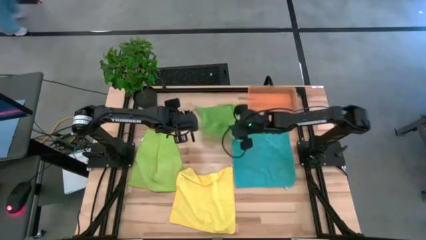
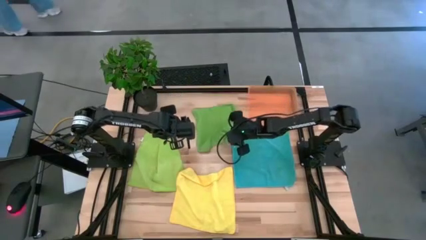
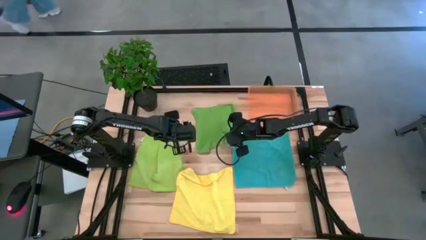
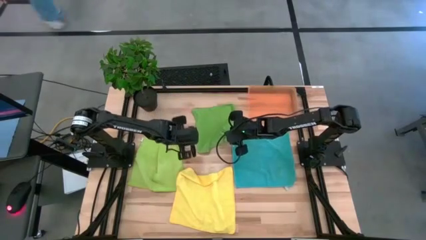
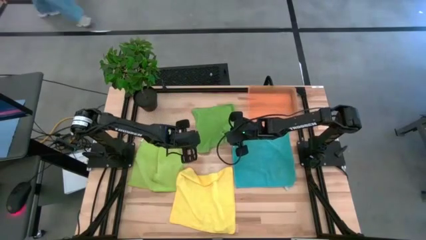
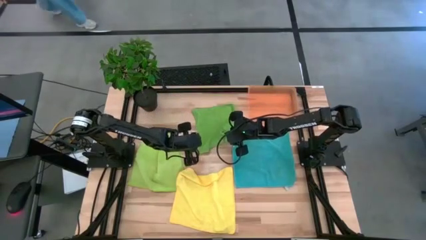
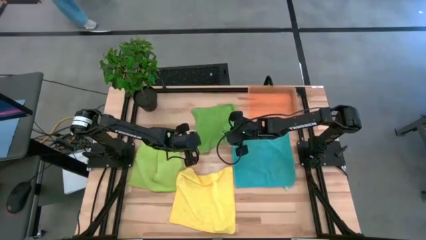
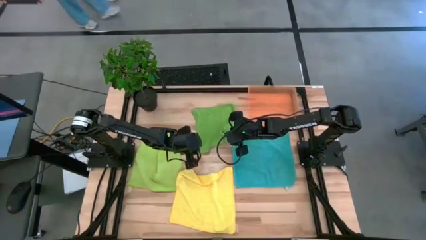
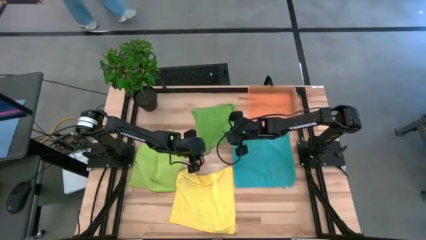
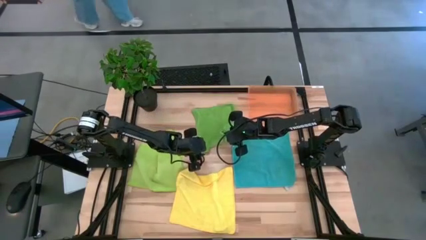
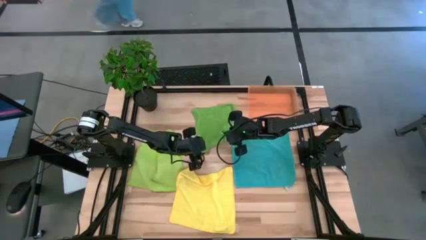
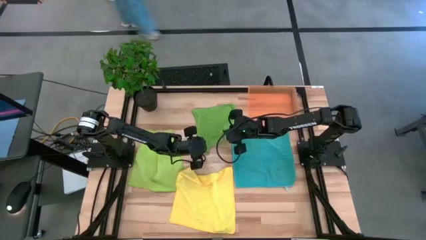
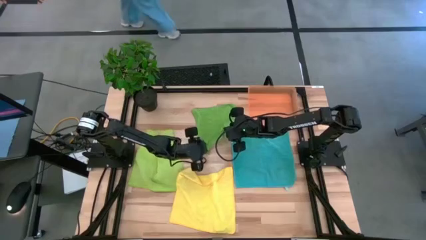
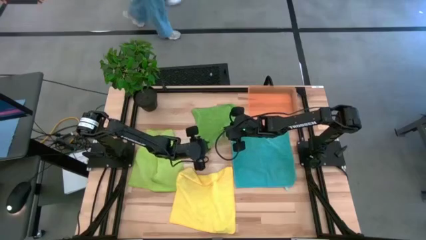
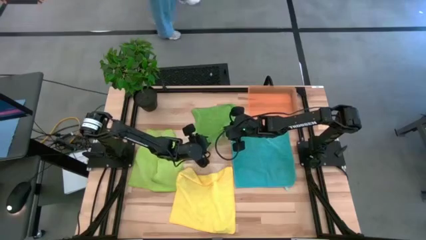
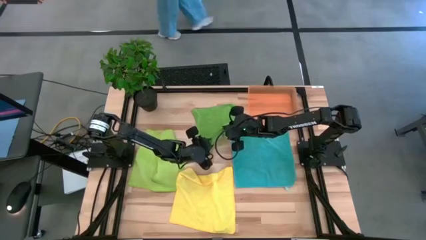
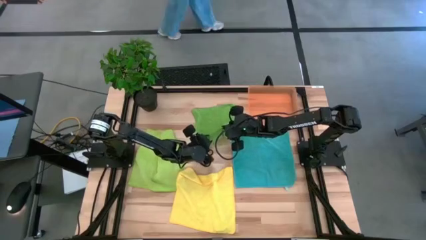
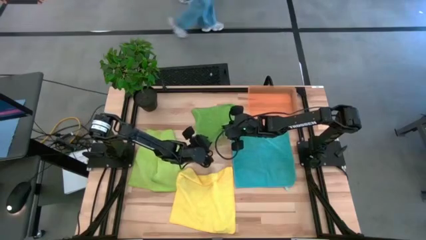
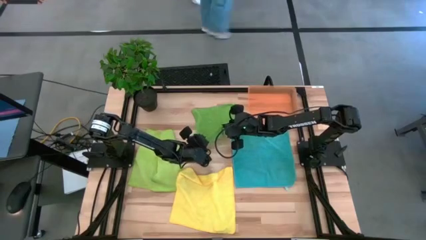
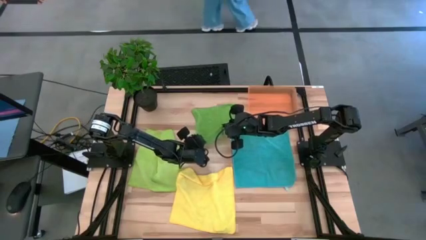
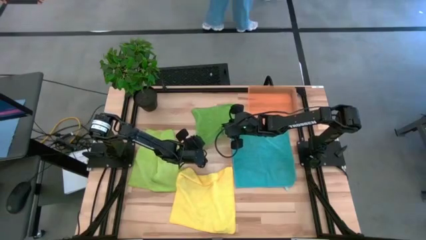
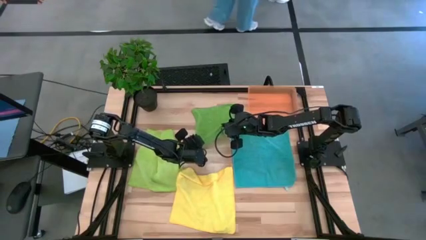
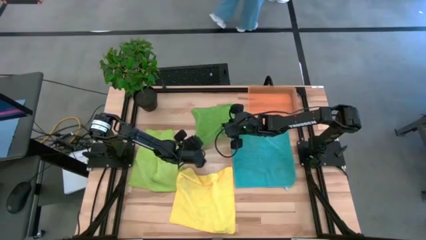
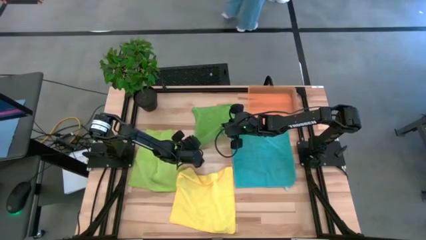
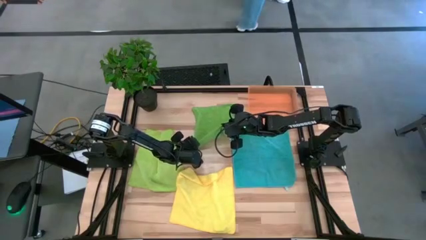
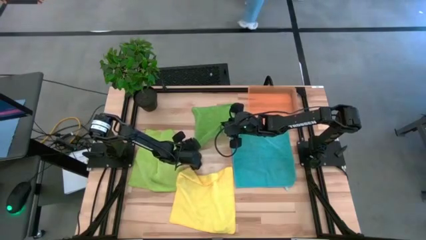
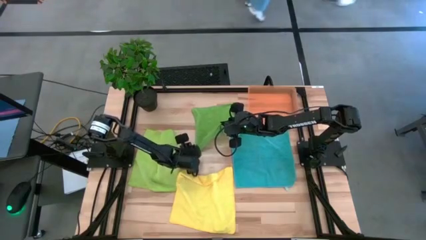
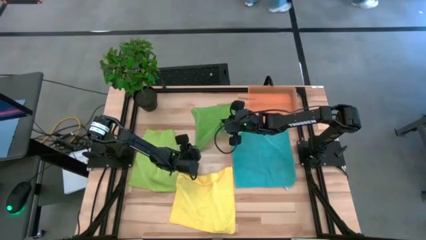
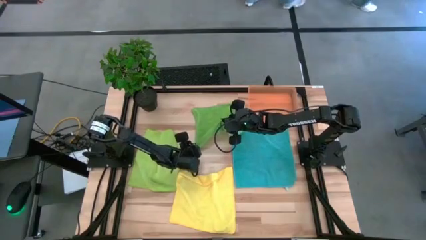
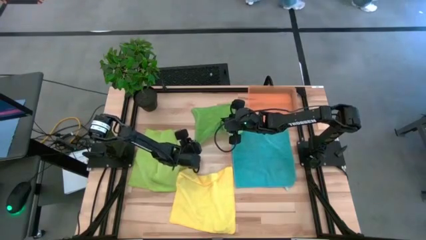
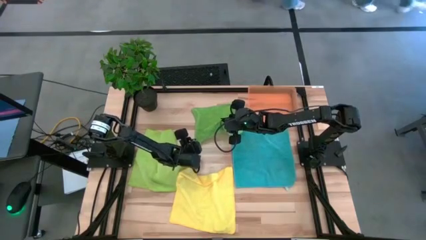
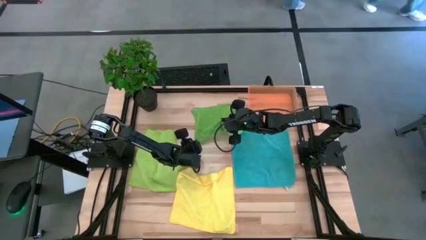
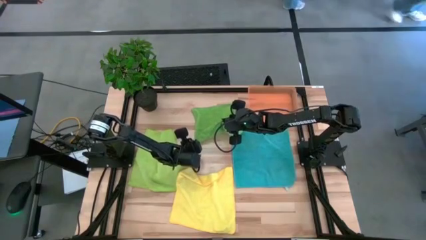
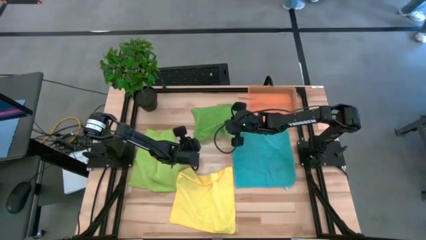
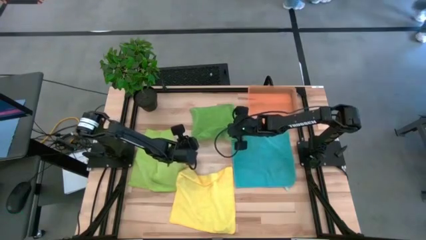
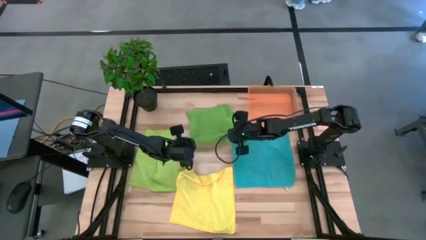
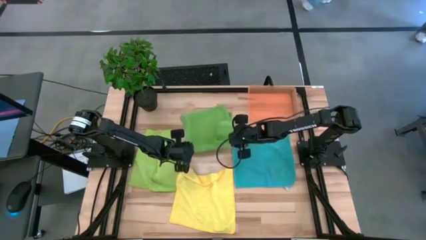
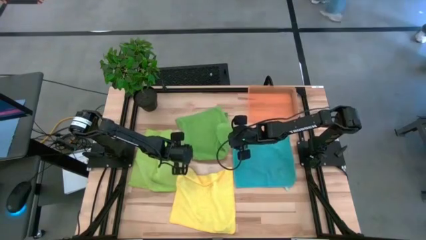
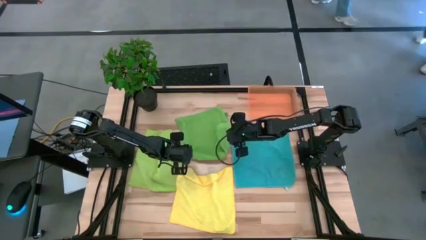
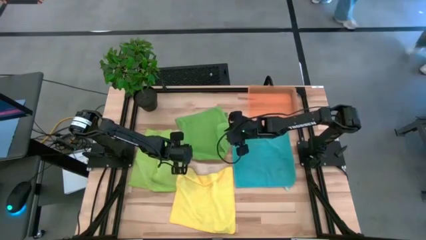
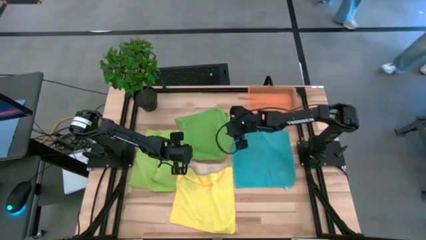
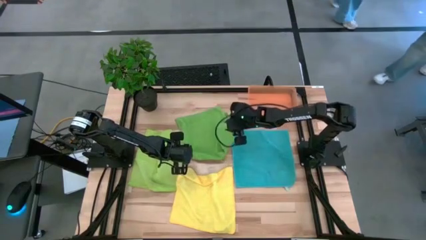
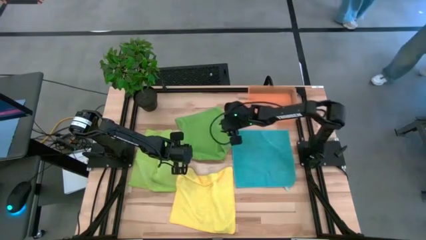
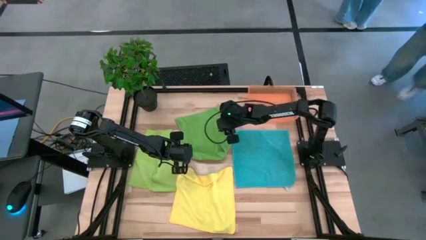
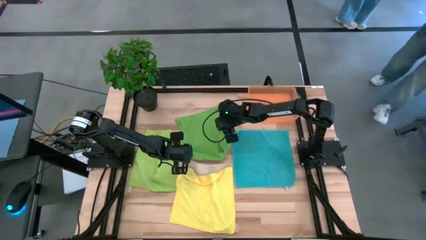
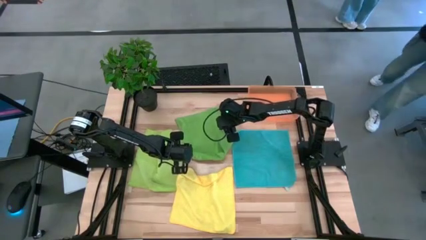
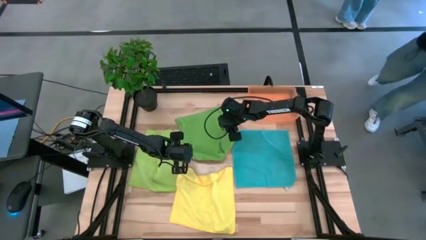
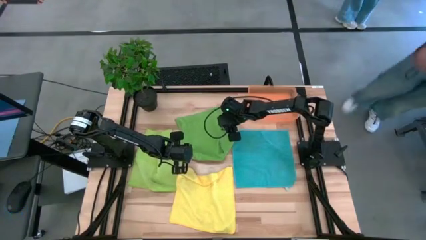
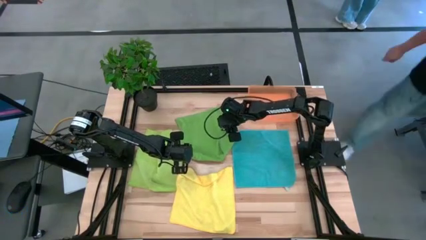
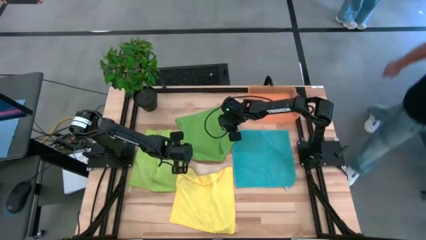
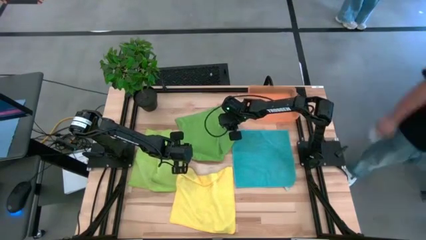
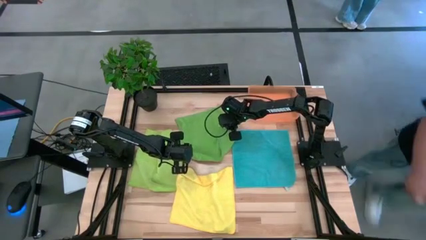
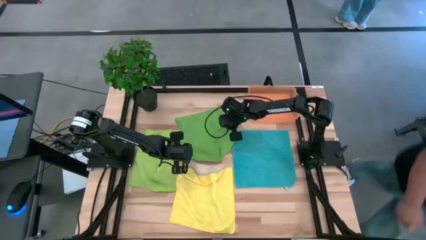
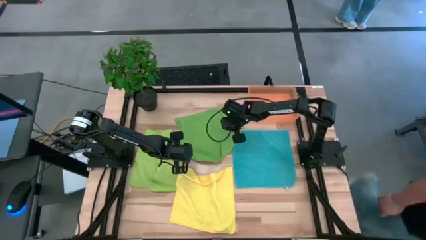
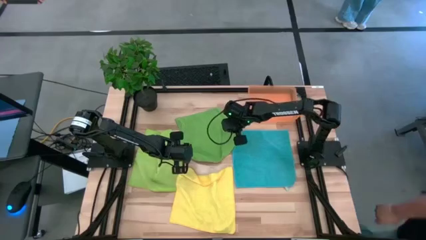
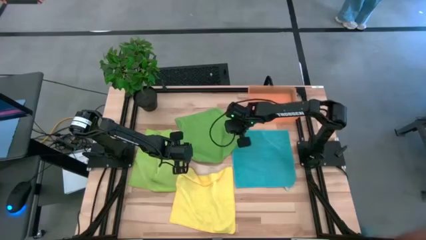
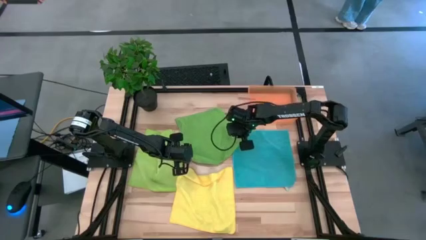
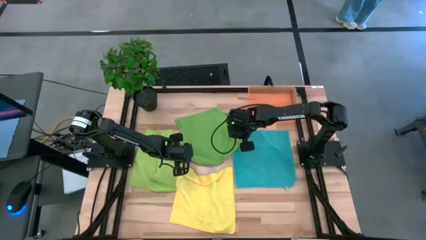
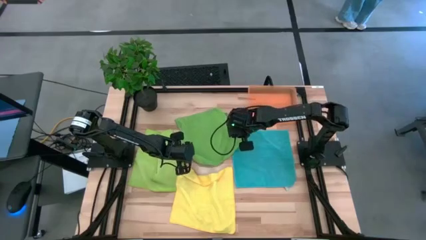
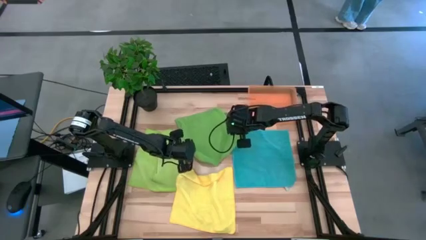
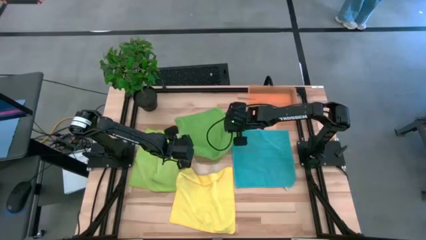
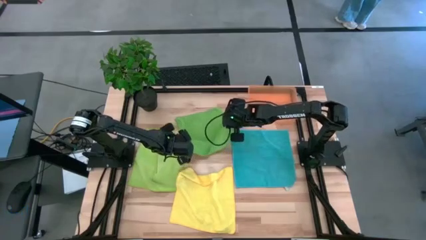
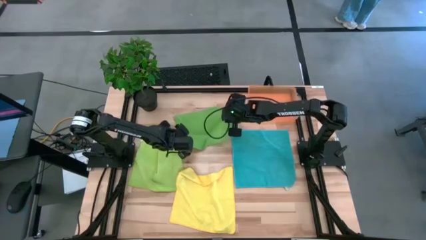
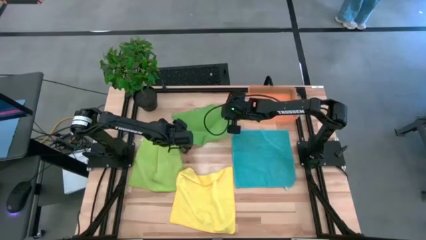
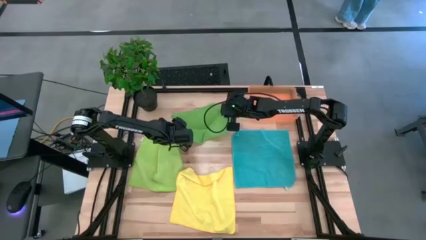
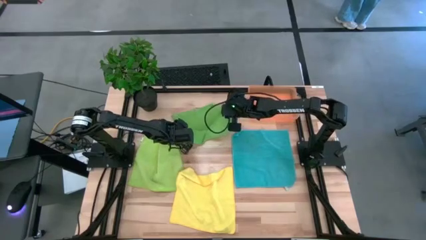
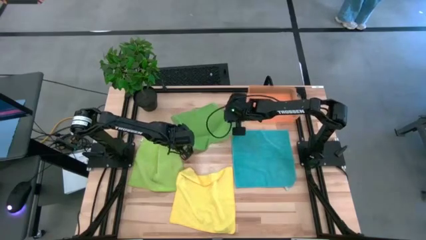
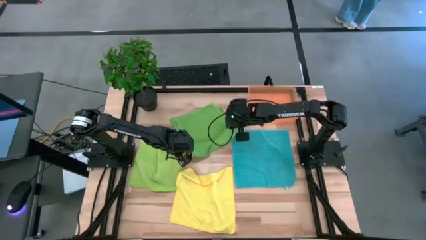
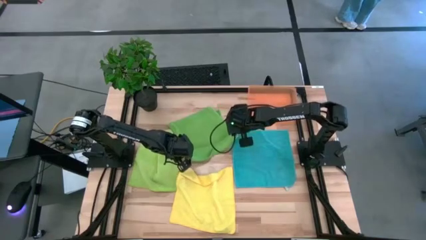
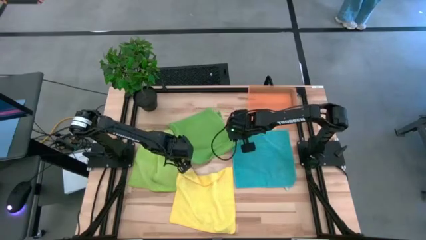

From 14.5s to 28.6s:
Task: Fold microfiber towels
Fold the green microfiber towel
